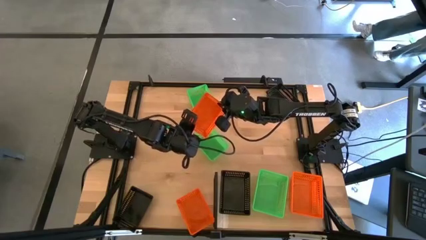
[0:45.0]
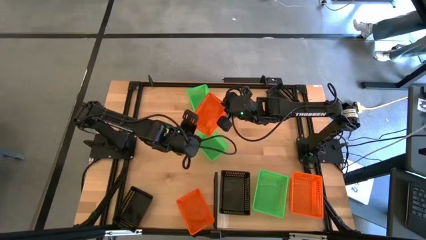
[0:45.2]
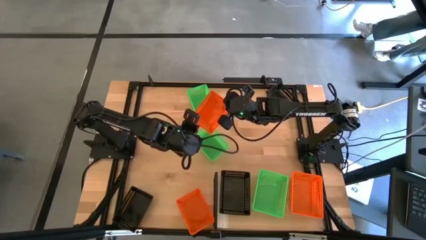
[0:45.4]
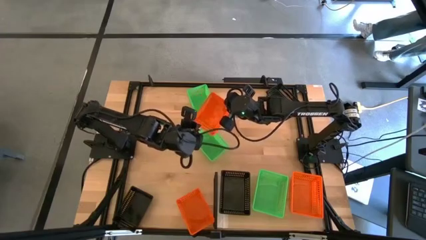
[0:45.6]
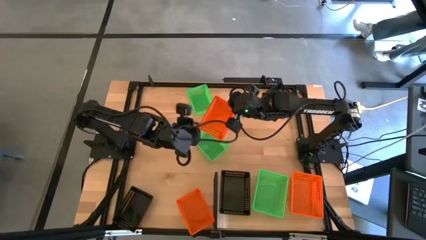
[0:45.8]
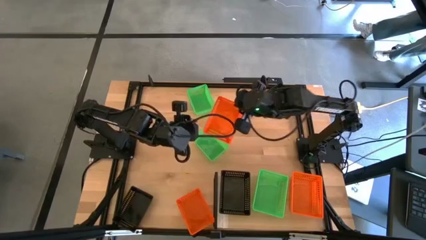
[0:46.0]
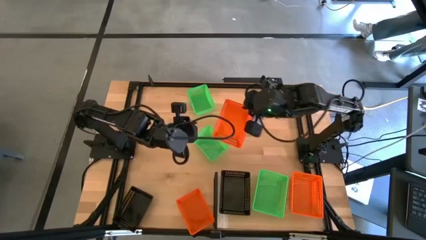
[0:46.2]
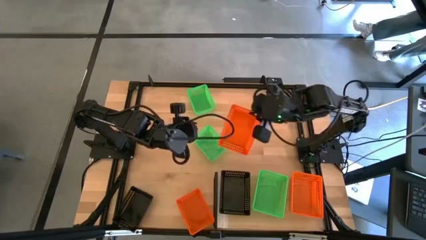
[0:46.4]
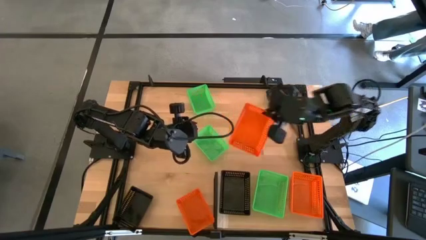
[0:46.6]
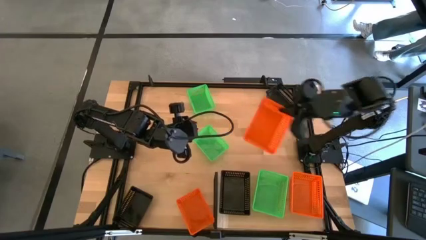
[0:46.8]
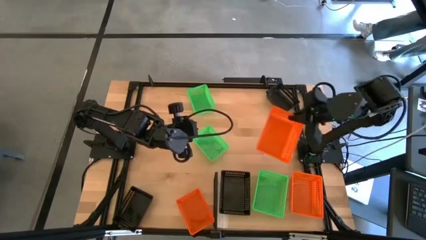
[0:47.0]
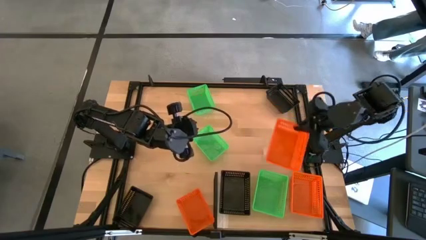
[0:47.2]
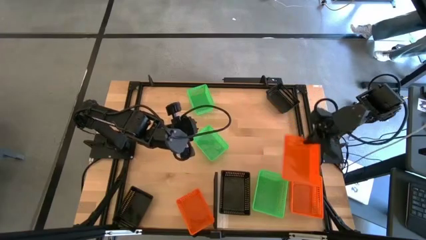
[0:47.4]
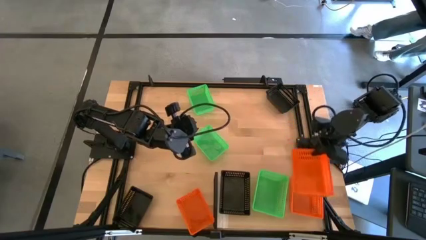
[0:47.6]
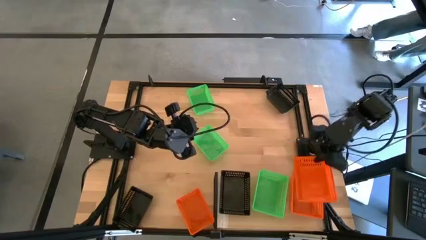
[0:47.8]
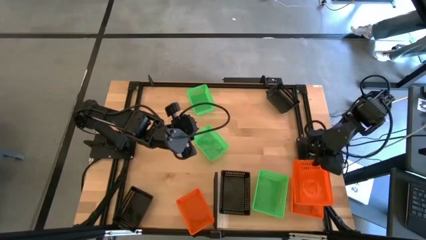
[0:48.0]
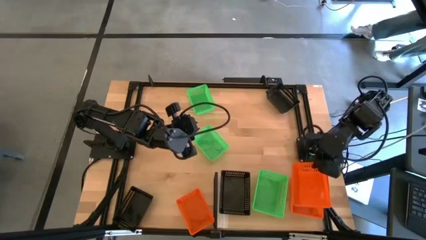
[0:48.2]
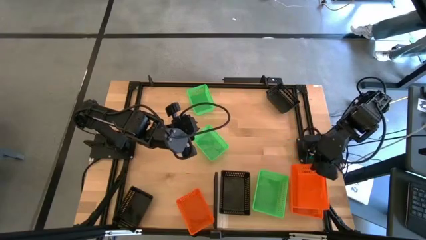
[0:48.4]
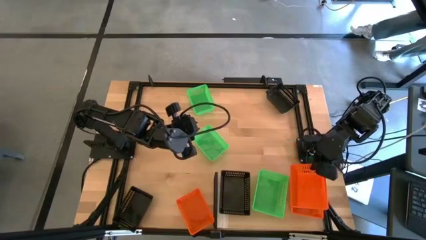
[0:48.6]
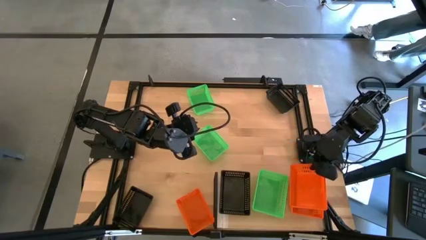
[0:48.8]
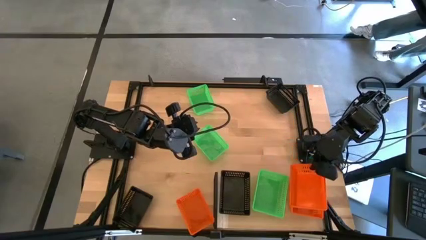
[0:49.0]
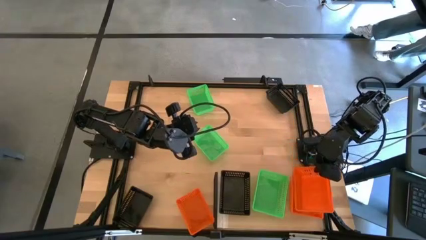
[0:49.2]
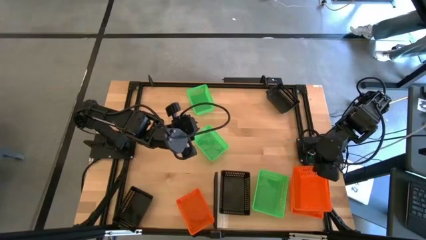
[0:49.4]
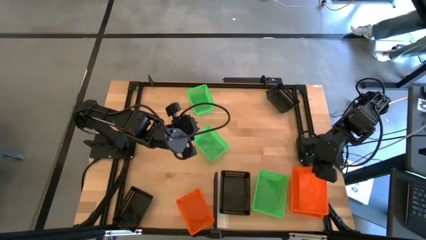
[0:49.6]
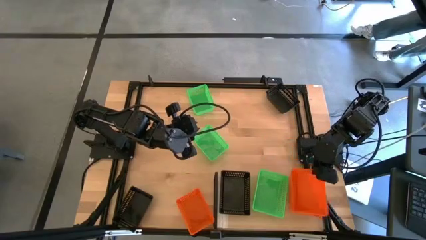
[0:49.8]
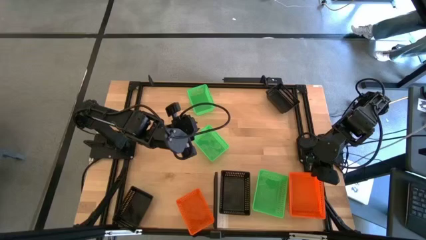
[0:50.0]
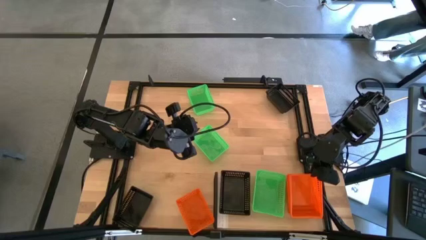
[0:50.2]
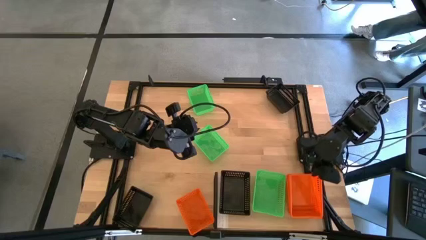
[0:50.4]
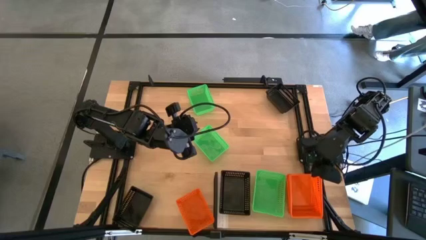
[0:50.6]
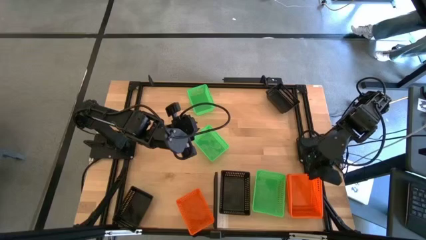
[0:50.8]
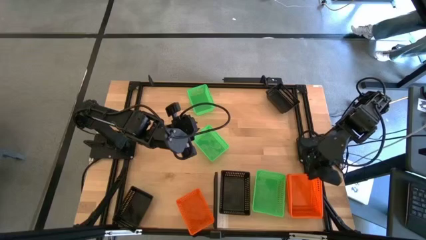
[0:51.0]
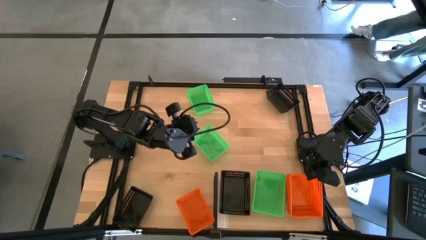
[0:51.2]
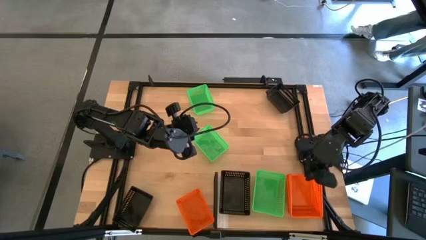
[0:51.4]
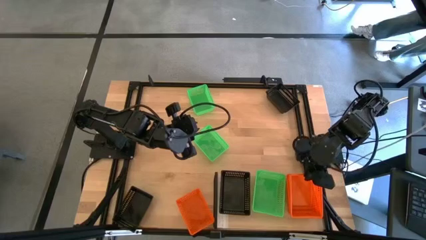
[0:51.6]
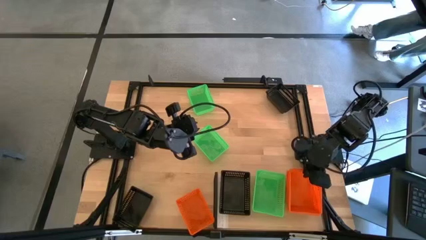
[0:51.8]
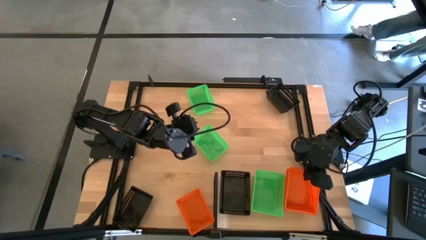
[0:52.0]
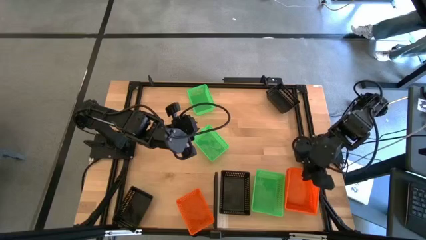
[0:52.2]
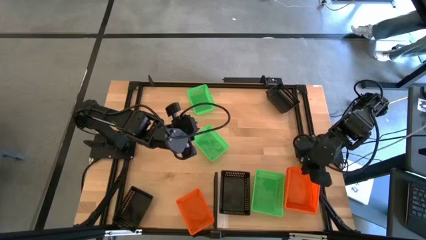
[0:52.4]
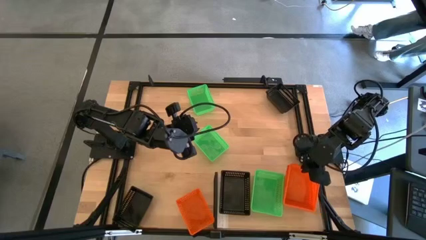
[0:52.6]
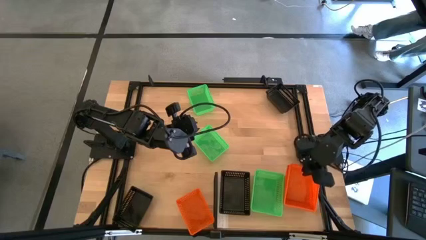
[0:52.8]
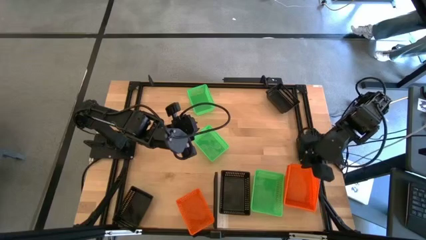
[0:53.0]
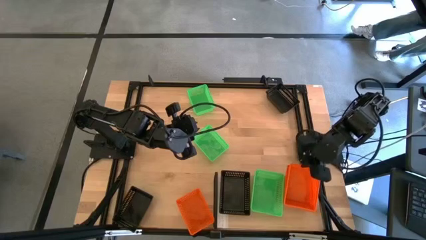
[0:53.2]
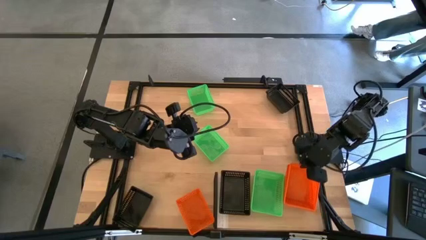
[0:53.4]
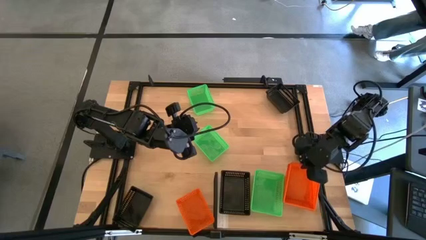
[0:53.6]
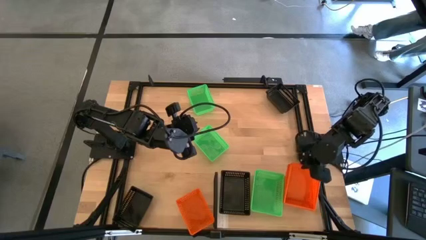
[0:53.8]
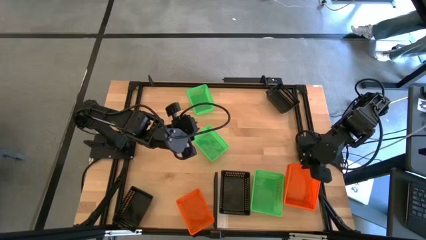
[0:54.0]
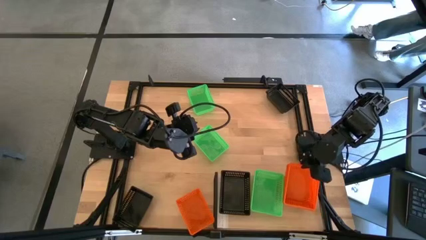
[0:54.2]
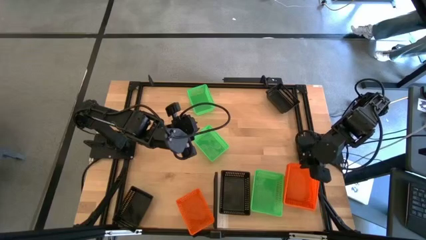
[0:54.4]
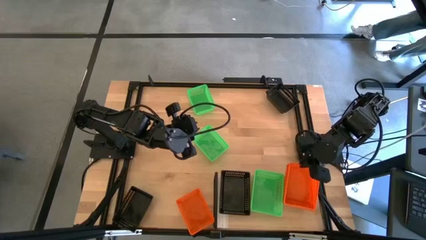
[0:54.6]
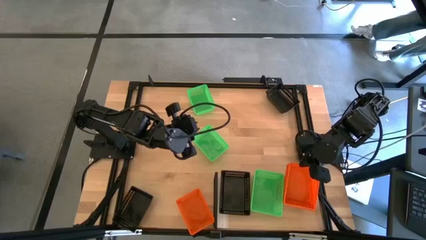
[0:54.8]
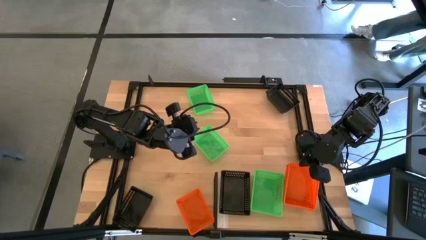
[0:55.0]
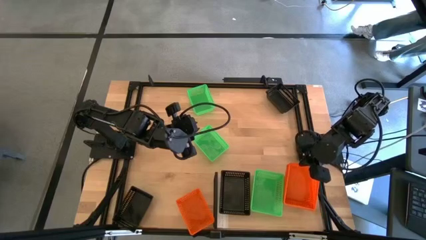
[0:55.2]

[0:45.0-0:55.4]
Task: Stack baskets on shelf by color
Stack the top orange bin on the orange bin on the shelf

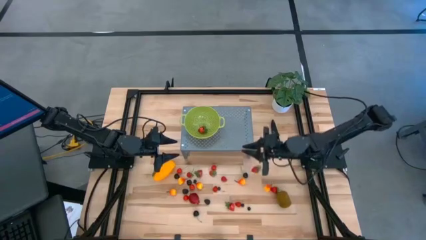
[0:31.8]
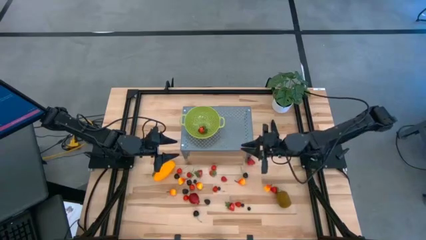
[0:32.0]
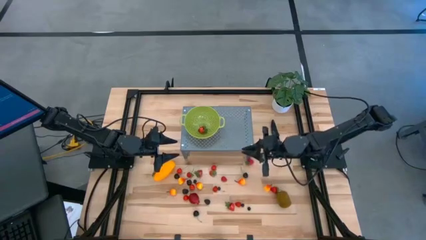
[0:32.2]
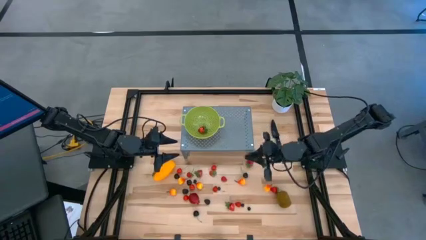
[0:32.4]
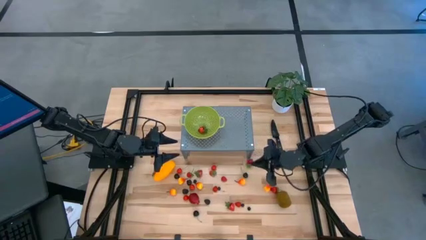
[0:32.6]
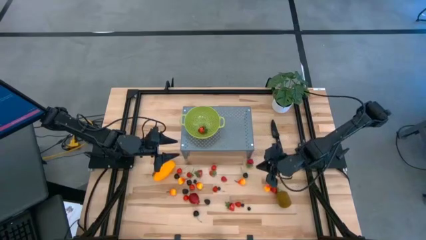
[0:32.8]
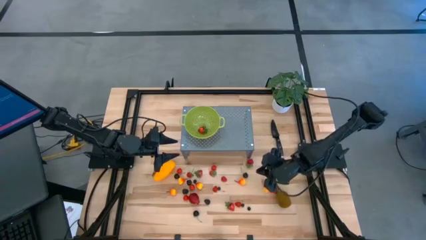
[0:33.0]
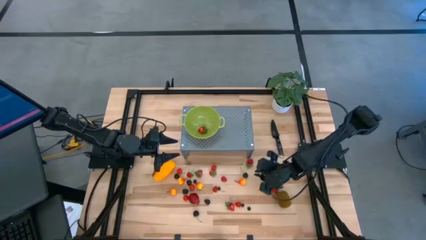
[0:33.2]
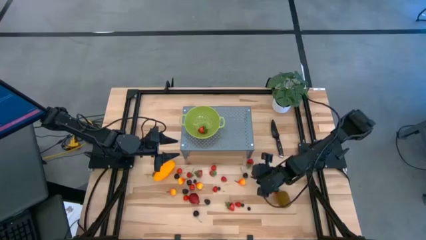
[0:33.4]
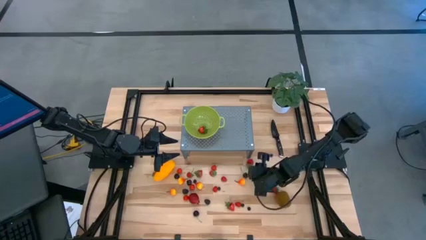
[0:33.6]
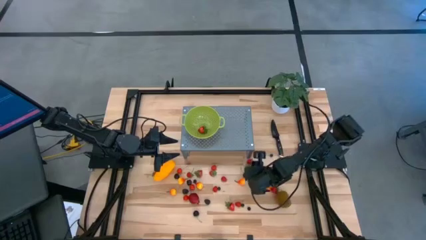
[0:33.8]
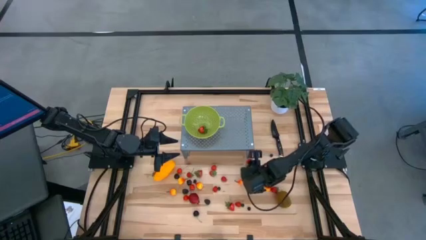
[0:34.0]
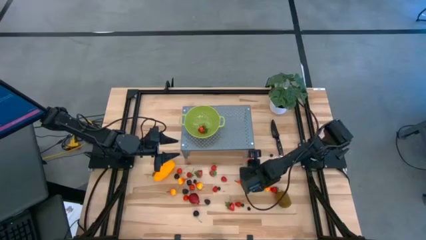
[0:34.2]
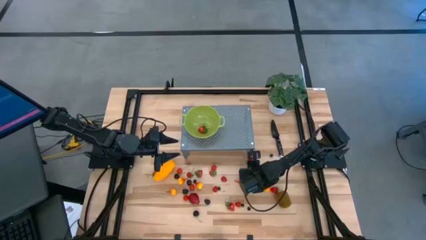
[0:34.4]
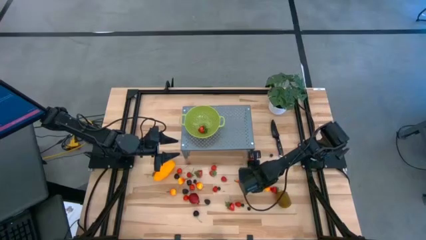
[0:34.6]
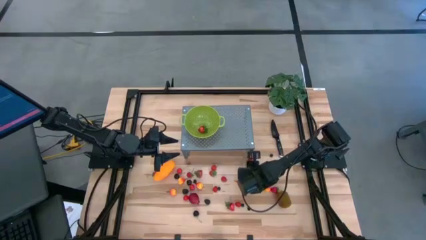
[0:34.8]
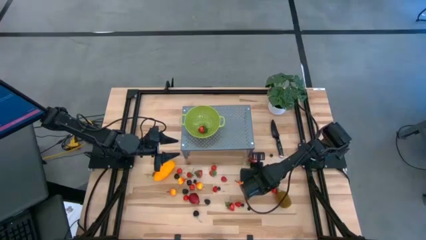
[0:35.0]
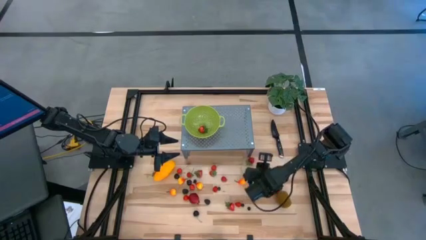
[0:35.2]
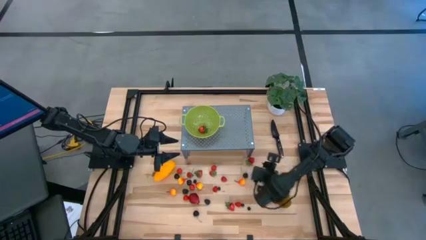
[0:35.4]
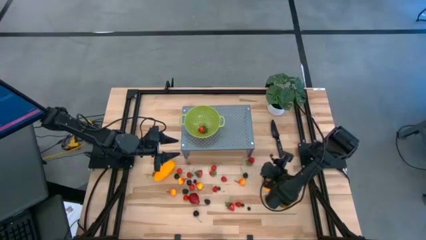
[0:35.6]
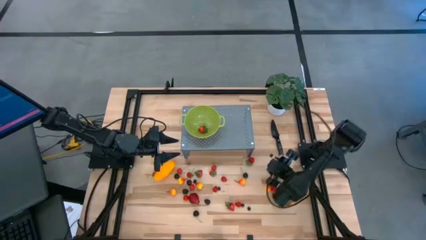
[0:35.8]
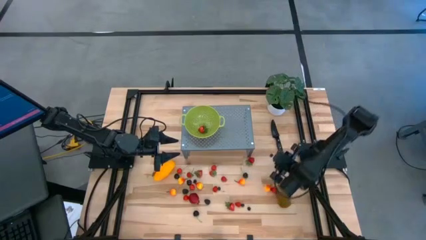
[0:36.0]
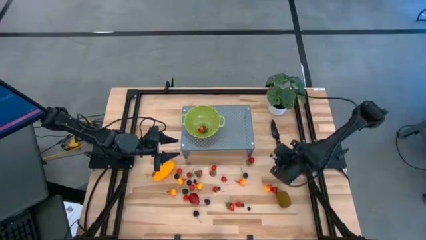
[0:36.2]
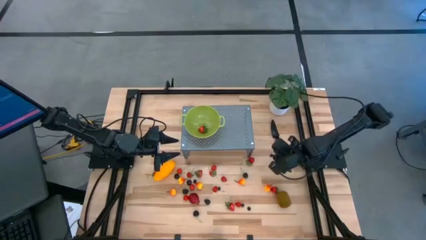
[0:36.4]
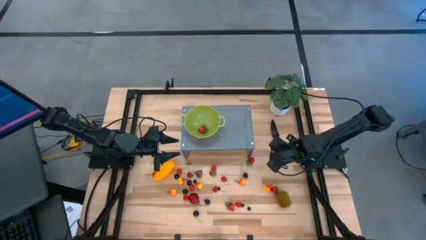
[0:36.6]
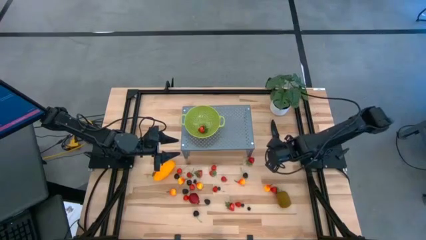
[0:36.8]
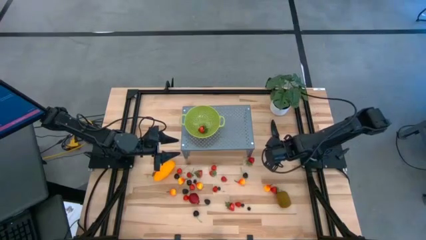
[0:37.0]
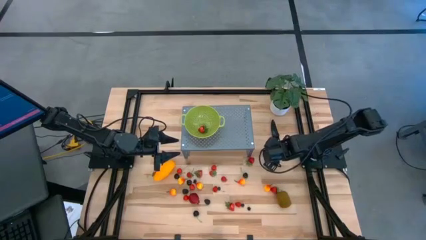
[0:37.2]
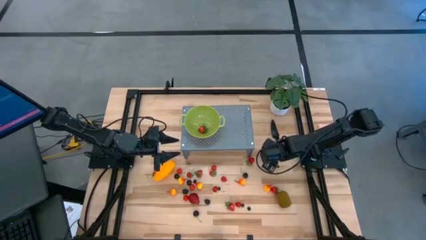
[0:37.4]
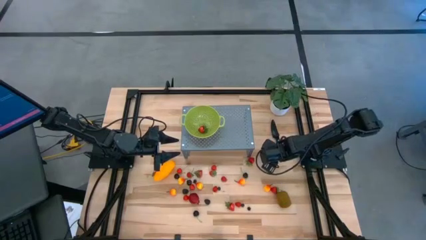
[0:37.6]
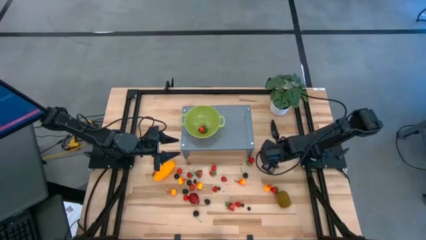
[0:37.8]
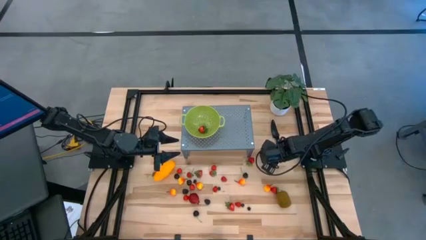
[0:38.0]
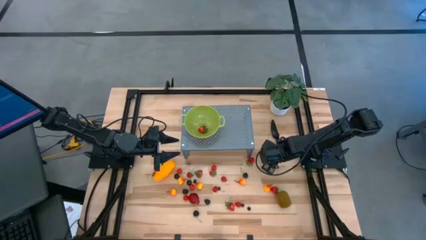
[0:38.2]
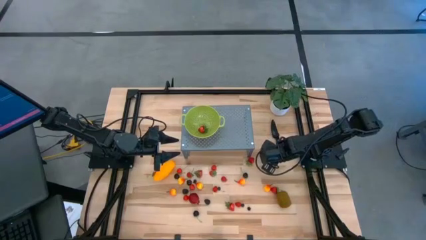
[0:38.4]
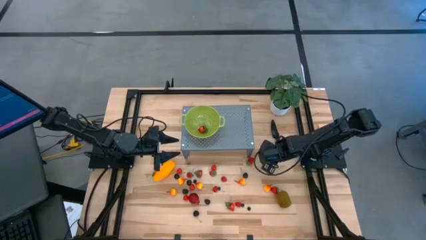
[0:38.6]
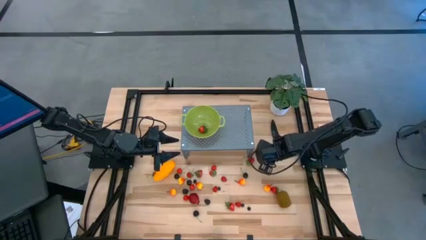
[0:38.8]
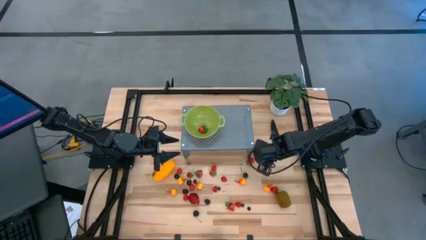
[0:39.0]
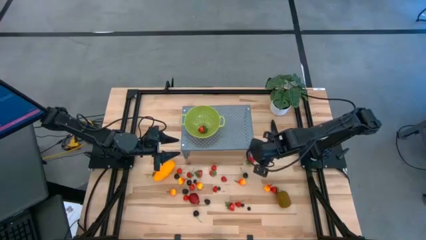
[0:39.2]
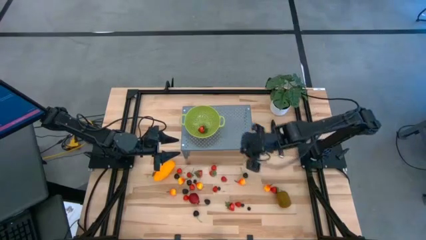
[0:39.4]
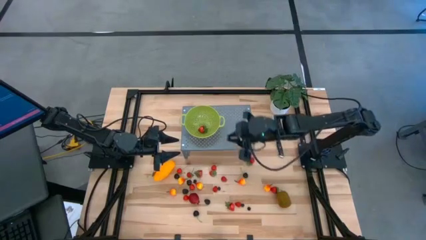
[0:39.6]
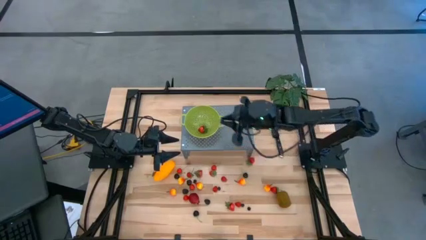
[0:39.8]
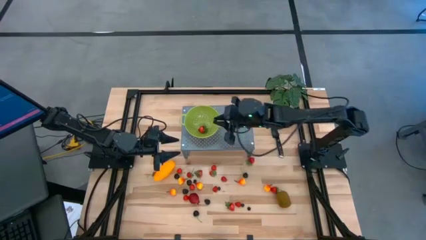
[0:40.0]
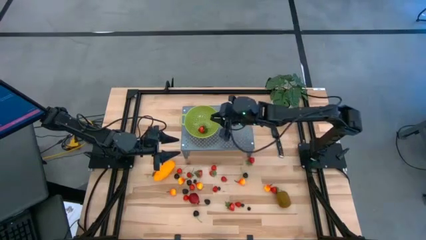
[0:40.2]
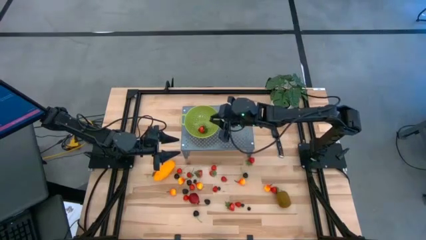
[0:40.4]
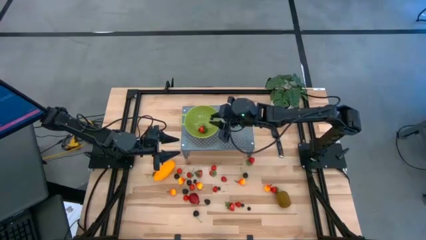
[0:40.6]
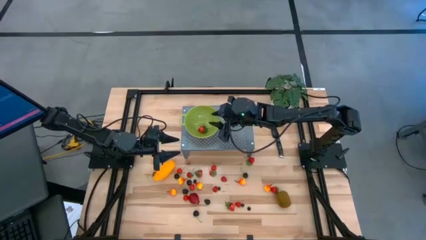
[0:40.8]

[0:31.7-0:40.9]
Task: Pick & Place Fruit
Put the blueberry into the green strainer bowl on the shelf
